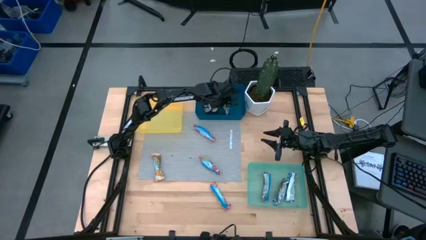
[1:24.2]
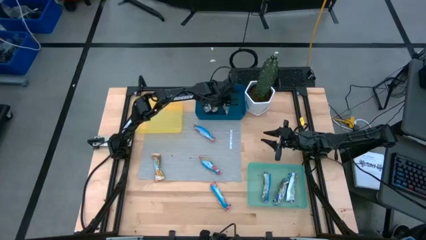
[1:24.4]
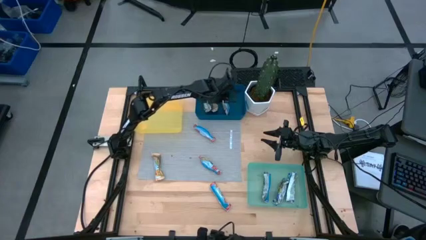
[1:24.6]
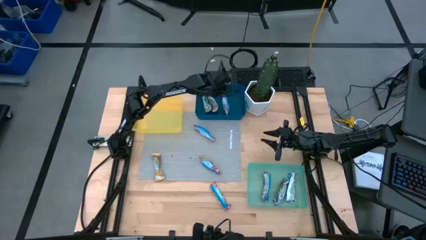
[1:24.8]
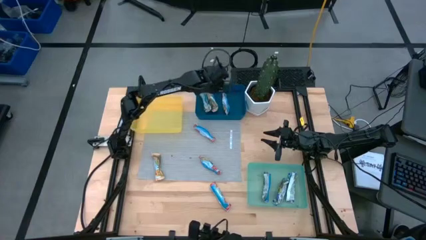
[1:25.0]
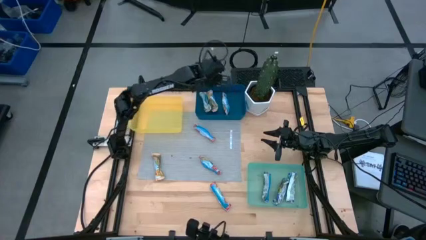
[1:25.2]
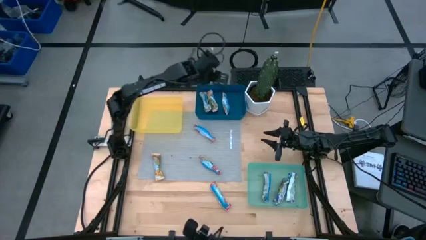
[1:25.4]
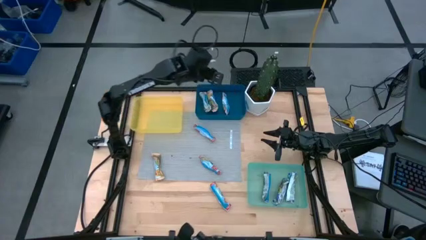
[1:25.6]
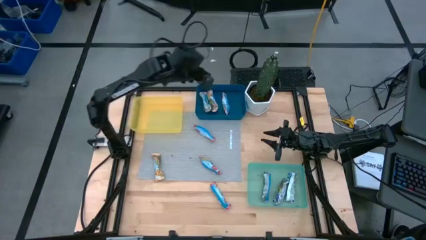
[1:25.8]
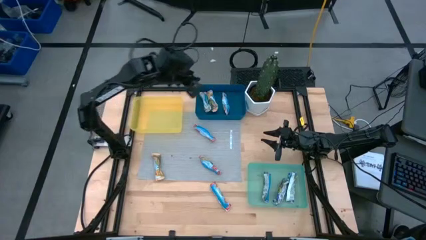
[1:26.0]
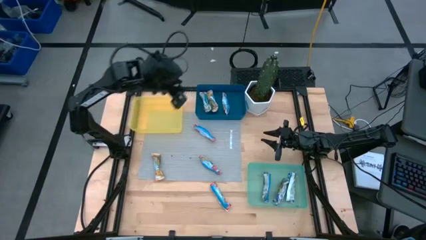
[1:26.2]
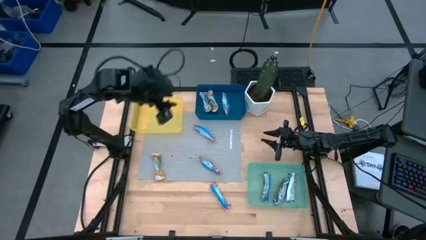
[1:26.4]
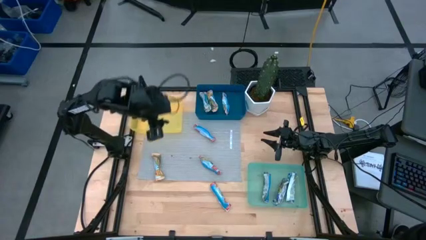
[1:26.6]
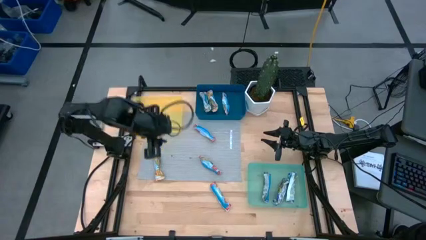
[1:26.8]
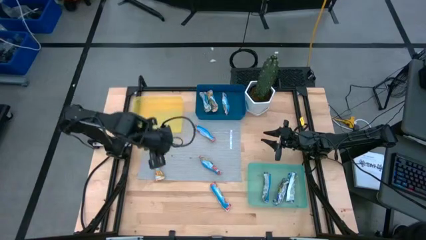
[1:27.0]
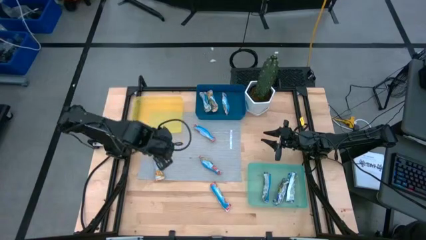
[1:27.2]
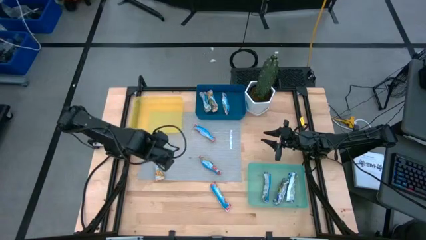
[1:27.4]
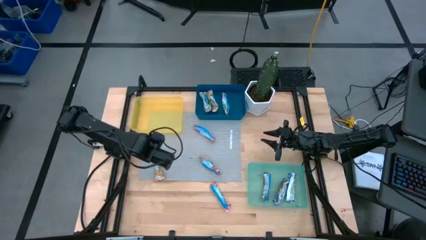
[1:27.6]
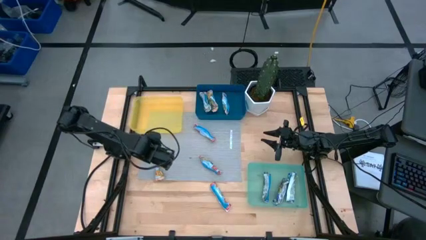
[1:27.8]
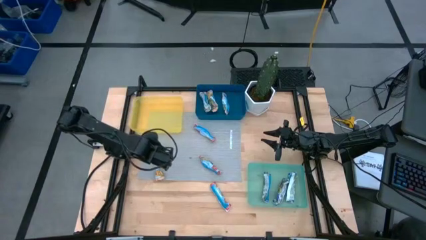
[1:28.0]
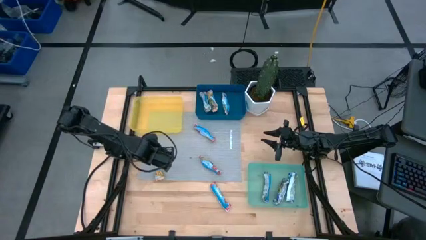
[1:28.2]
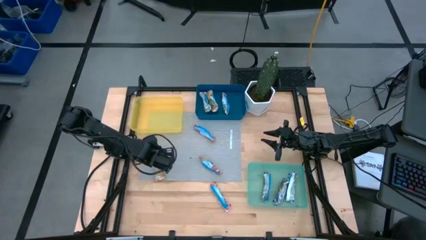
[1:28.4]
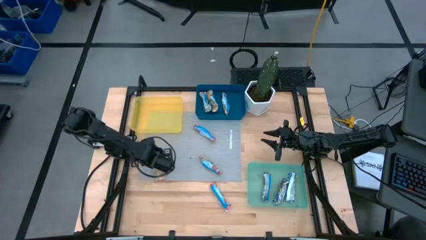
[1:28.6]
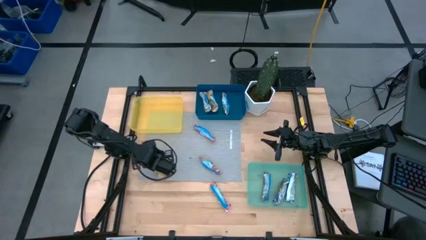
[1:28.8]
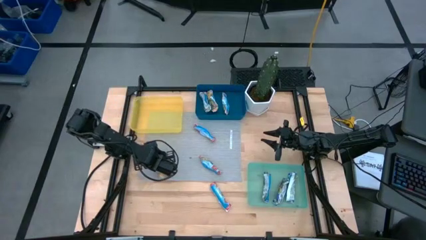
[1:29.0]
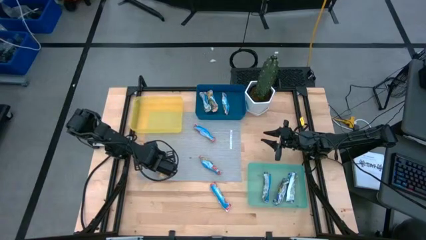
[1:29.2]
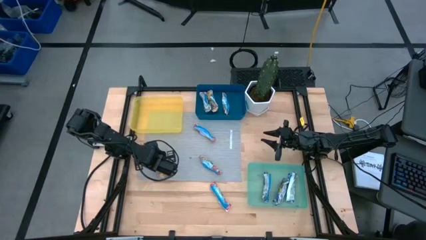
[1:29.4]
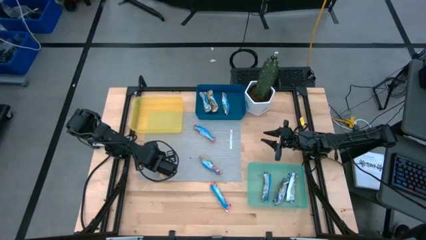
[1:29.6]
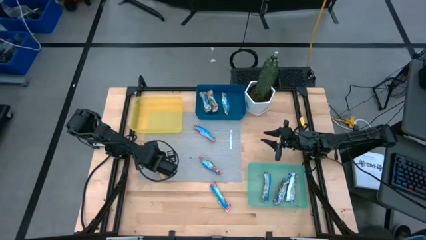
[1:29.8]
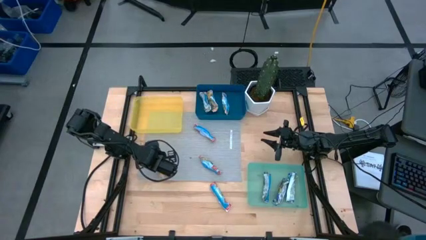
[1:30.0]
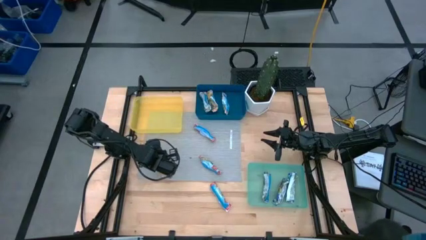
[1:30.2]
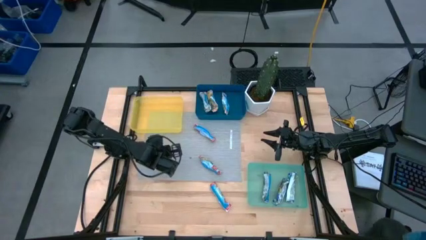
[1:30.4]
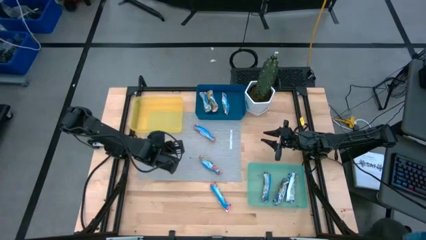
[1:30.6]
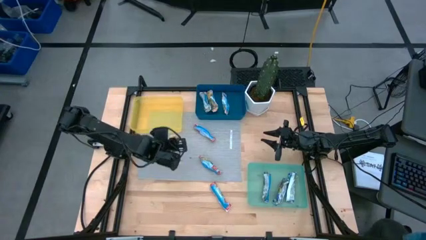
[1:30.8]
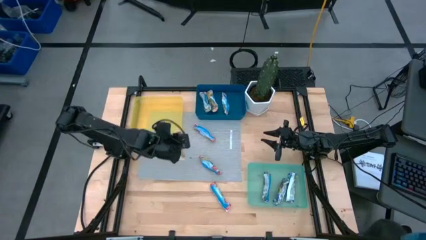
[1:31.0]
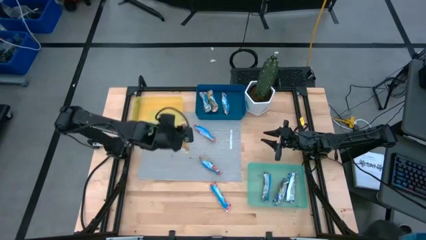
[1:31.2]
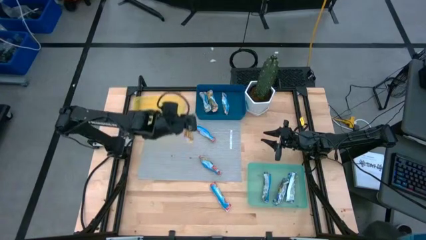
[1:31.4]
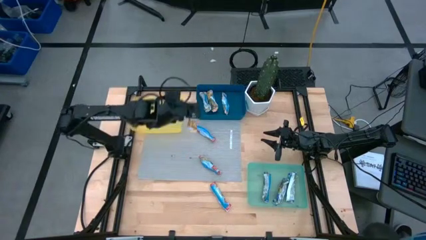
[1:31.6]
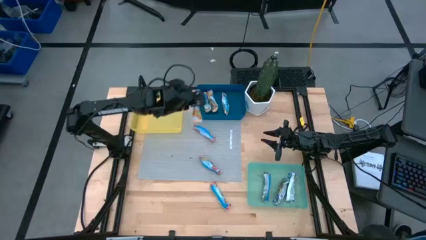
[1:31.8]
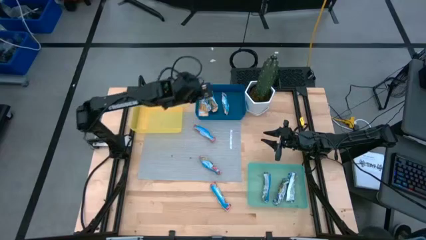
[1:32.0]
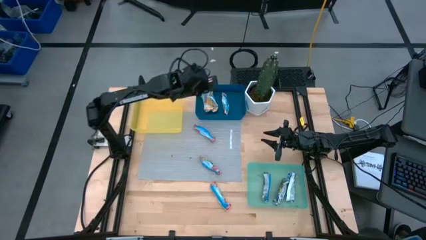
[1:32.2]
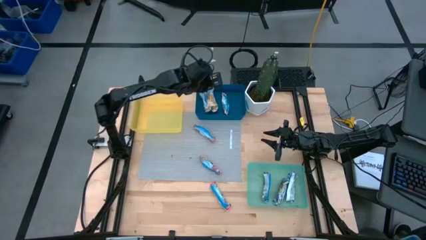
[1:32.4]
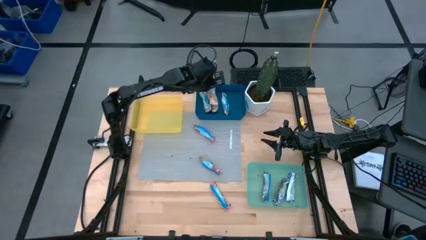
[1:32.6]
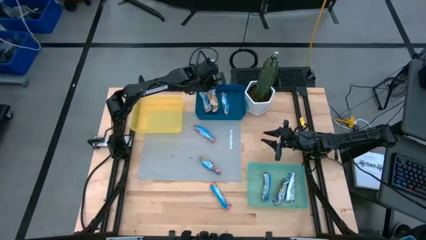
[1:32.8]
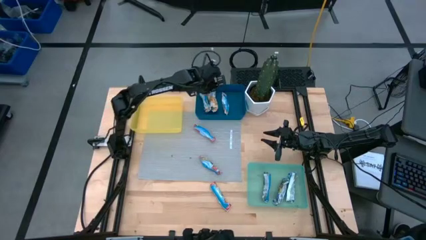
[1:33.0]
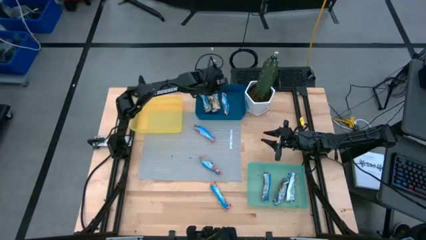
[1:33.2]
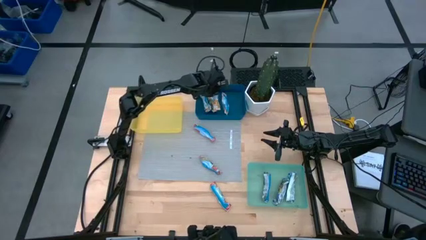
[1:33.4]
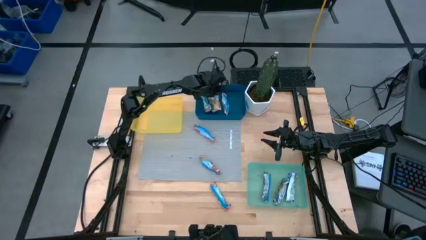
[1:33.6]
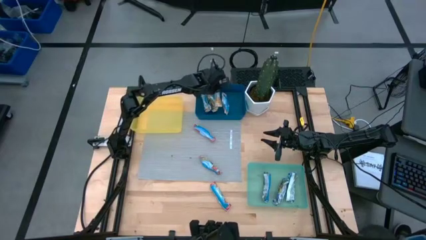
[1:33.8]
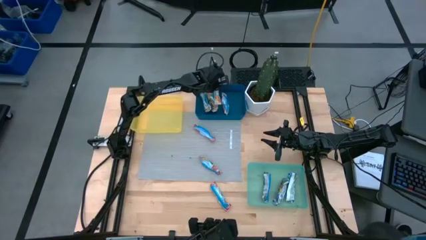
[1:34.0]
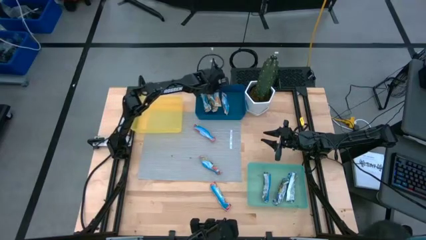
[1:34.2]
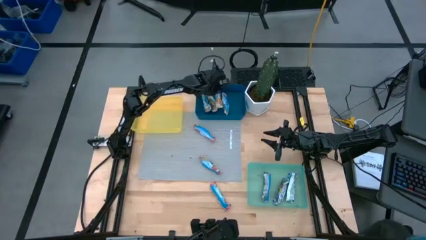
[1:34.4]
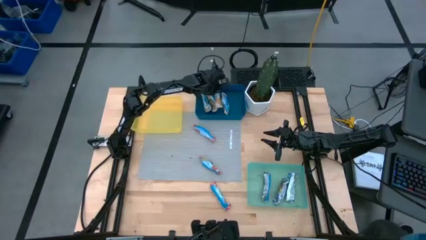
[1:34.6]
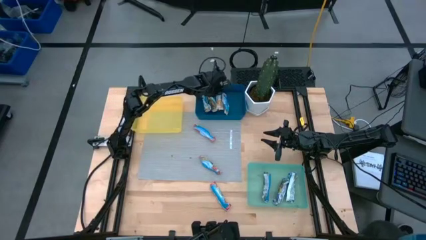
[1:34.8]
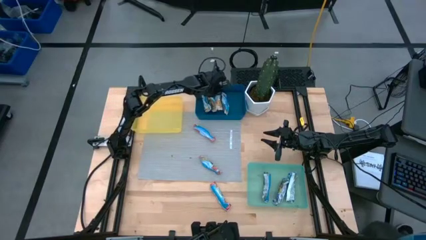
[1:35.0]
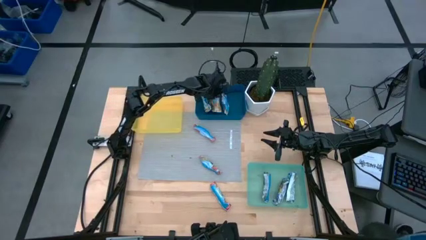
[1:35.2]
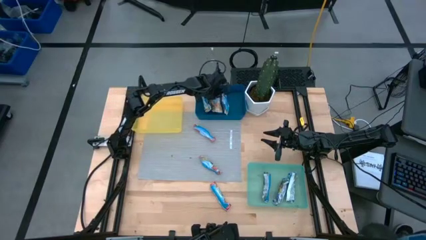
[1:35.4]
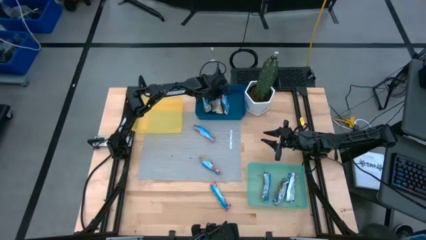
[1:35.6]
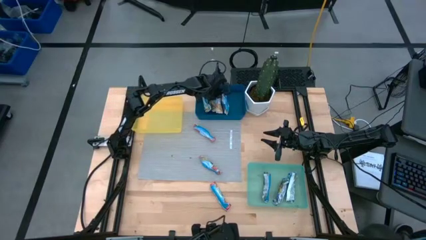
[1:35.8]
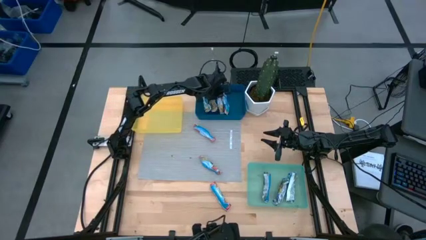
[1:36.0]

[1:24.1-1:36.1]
Task: Pick and place Granola Bars by type
Put the yellow granola bar into the blue bin
